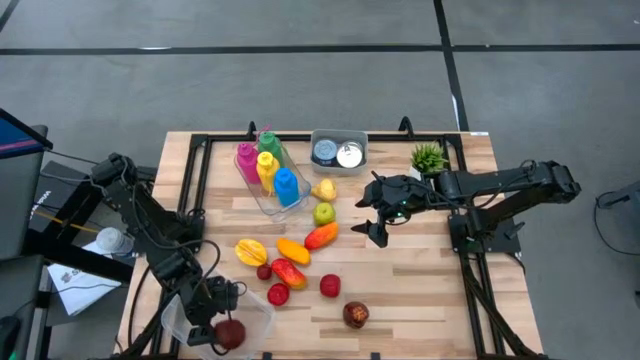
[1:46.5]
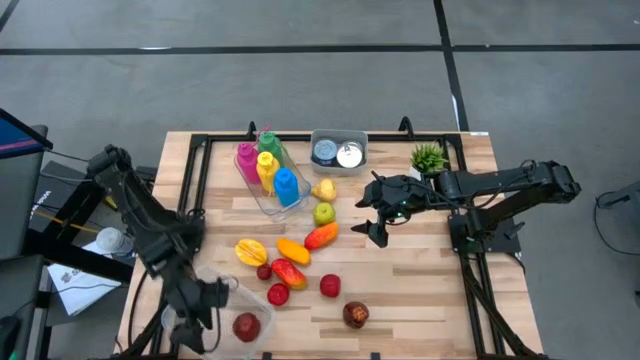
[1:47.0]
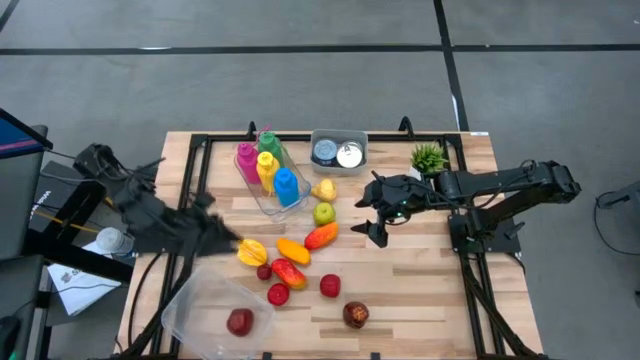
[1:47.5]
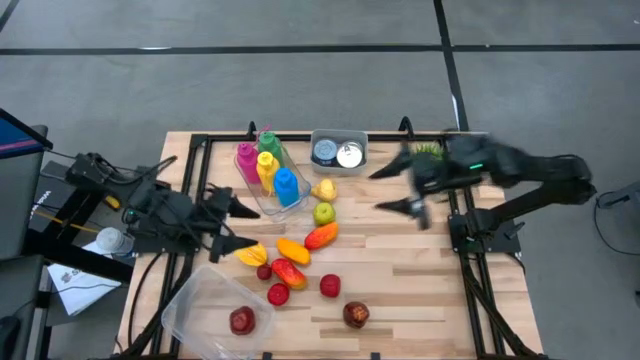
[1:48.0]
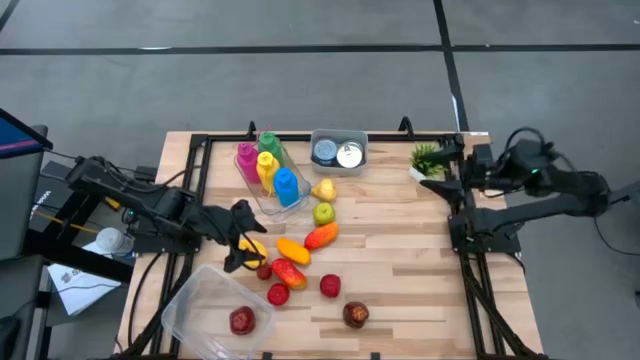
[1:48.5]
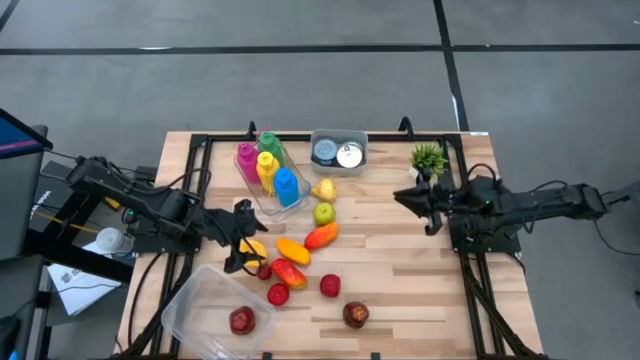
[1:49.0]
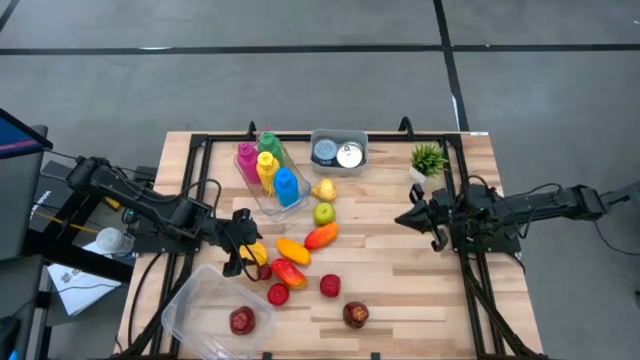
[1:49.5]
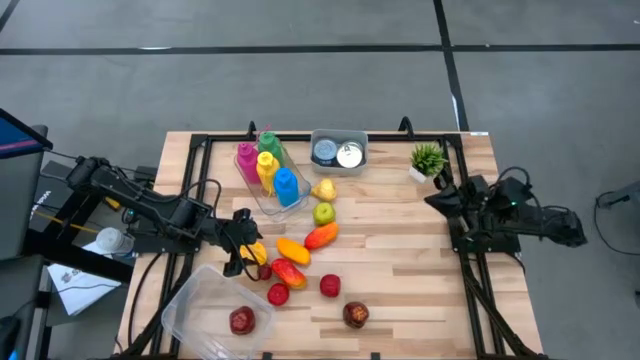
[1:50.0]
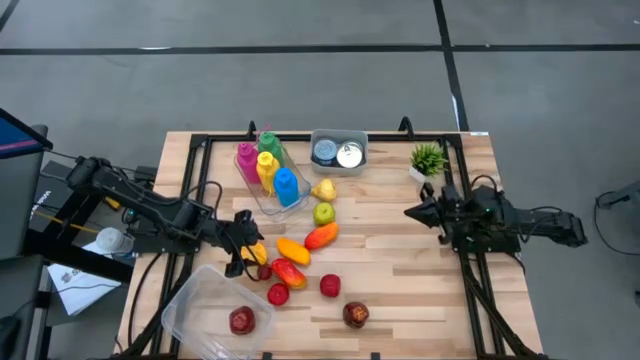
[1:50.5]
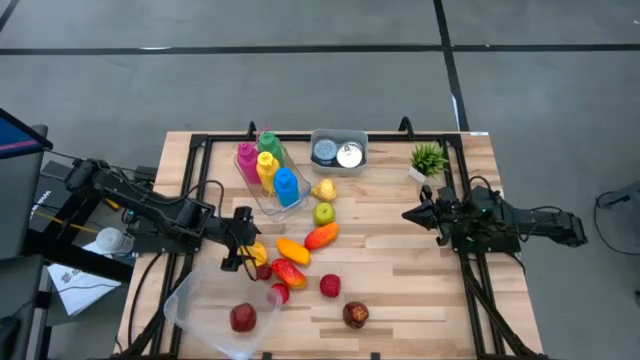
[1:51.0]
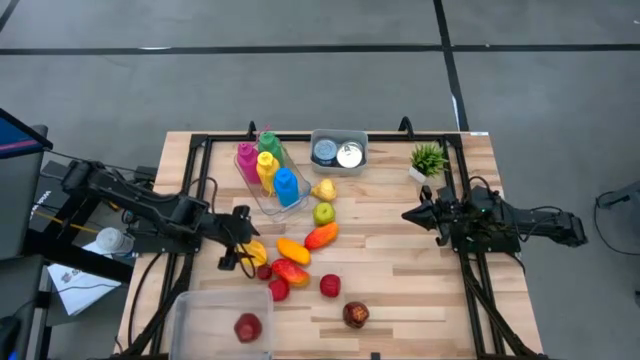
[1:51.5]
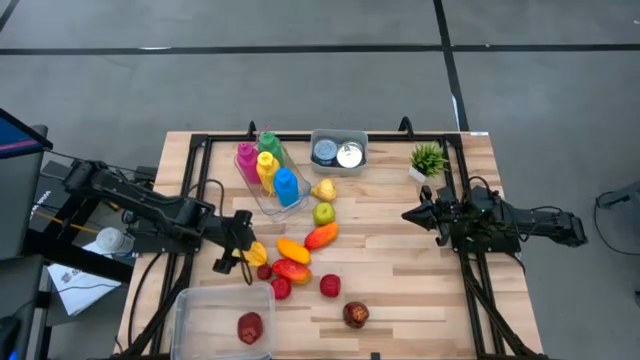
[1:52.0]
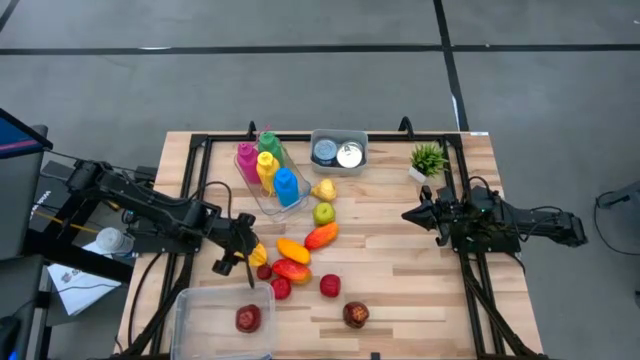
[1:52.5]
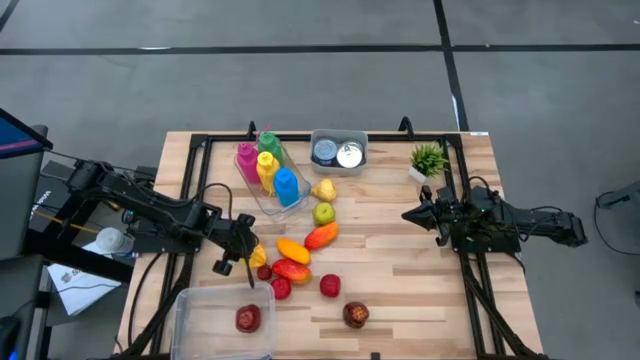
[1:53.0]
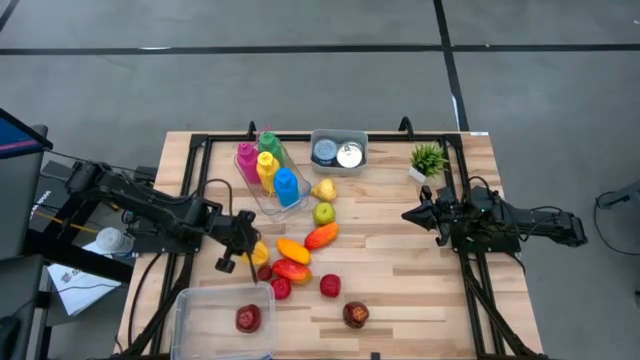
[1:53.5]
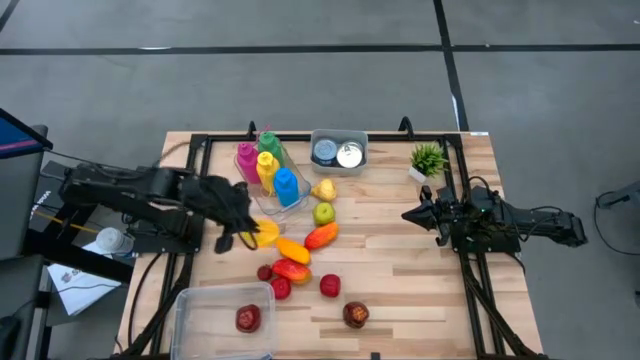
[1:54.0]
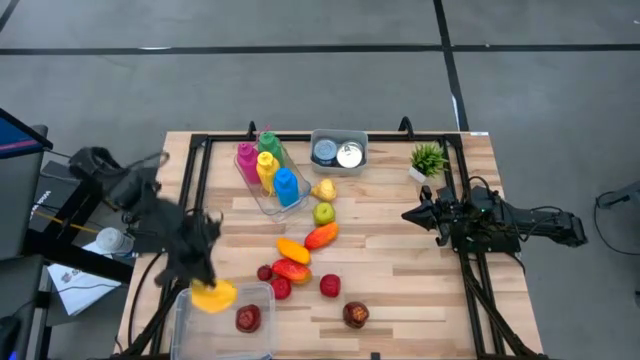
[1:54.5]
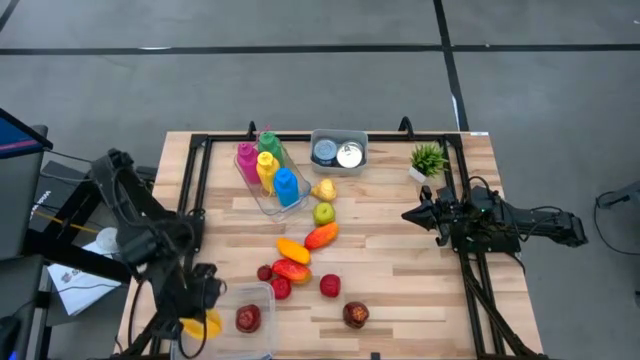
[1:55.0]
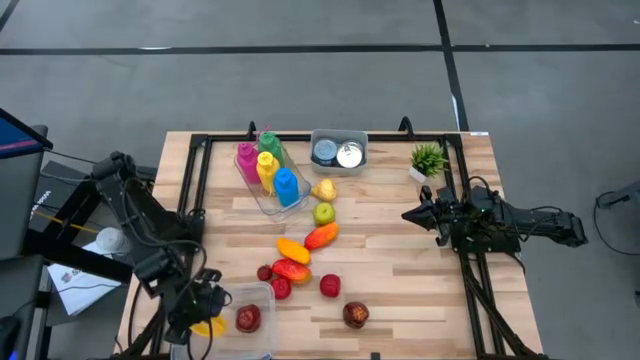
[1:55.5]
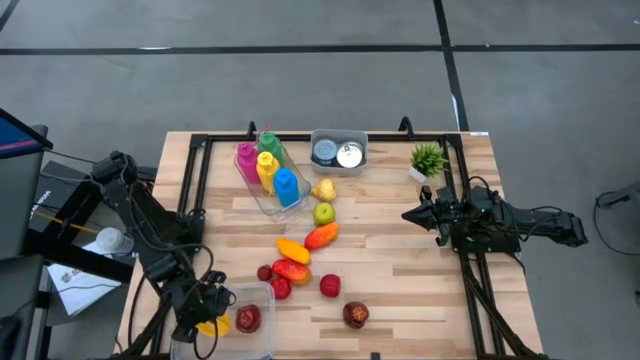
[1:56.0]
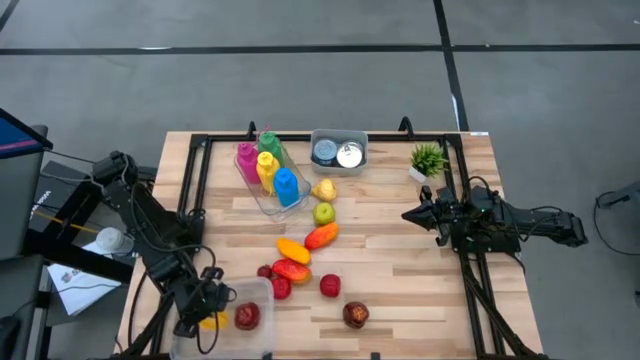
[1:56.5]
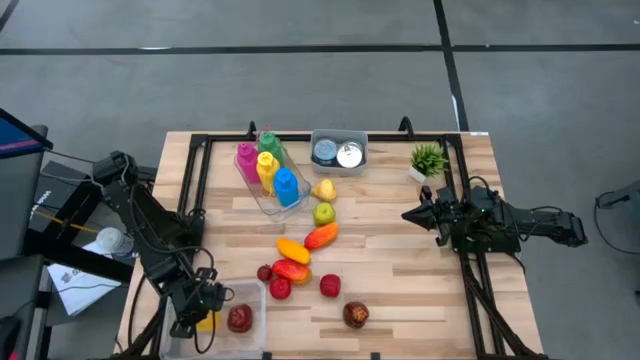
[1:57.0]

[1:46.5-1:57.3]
Task: Pick & Place Food Item
Put the yellow starfruit into the white bin

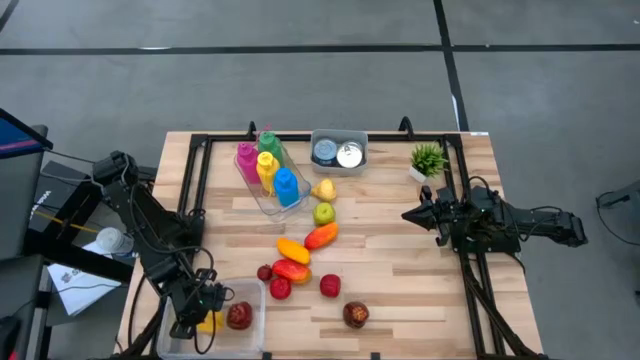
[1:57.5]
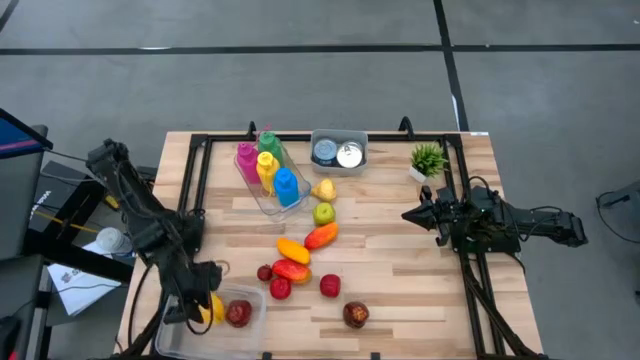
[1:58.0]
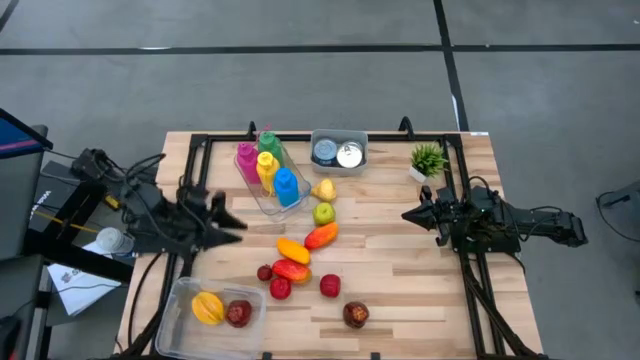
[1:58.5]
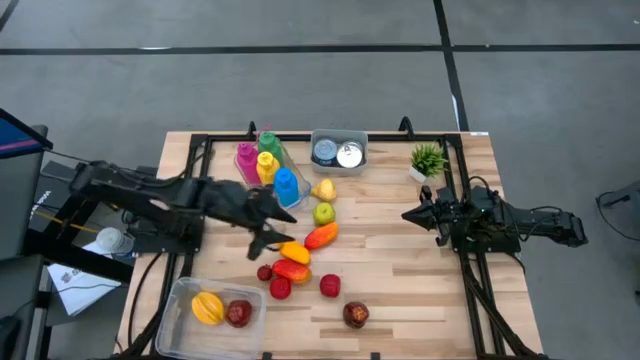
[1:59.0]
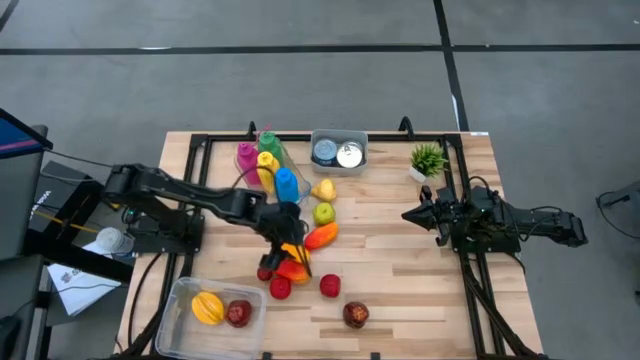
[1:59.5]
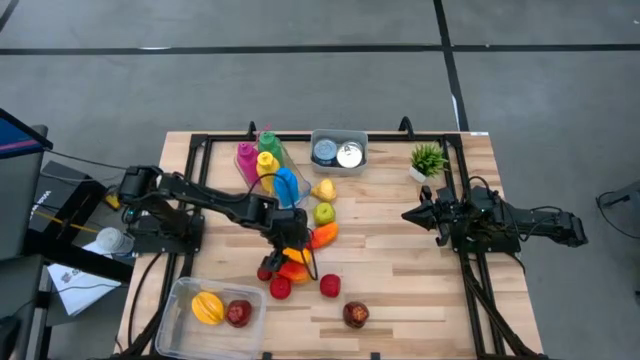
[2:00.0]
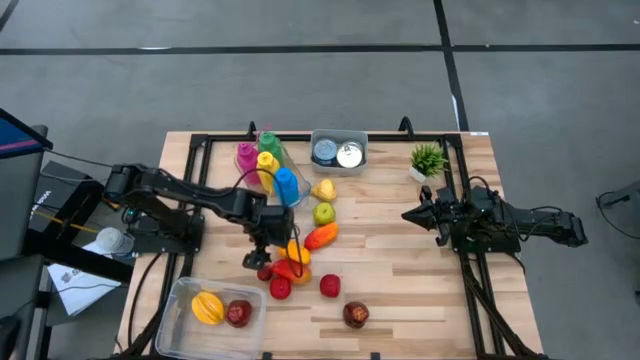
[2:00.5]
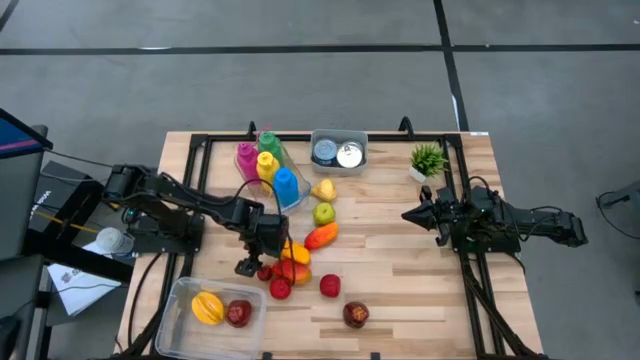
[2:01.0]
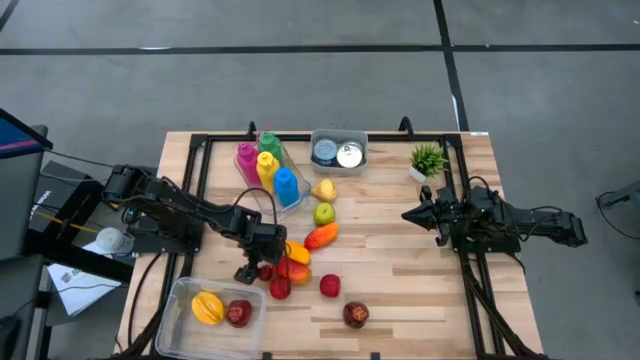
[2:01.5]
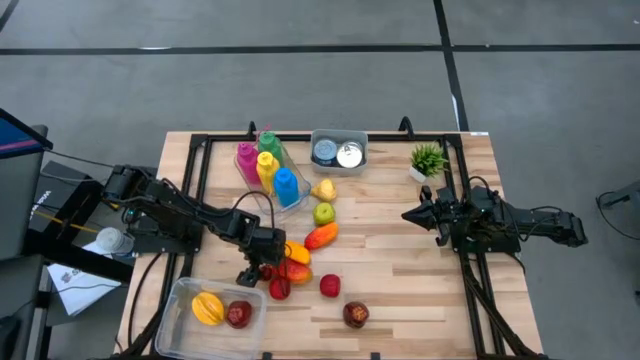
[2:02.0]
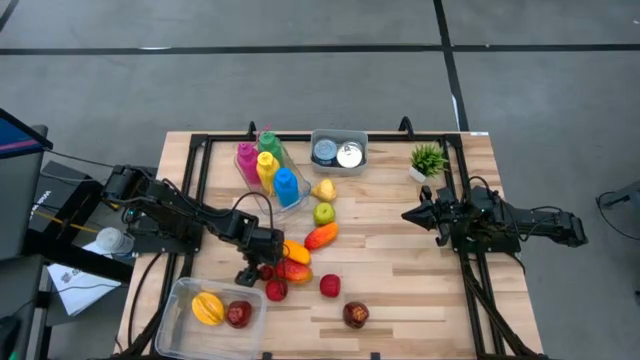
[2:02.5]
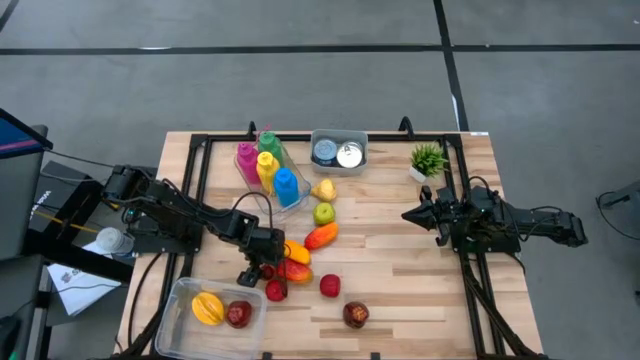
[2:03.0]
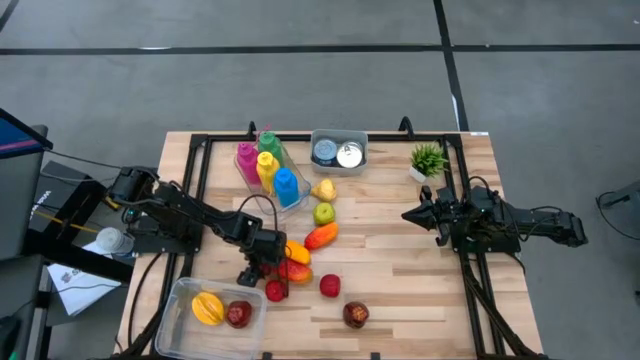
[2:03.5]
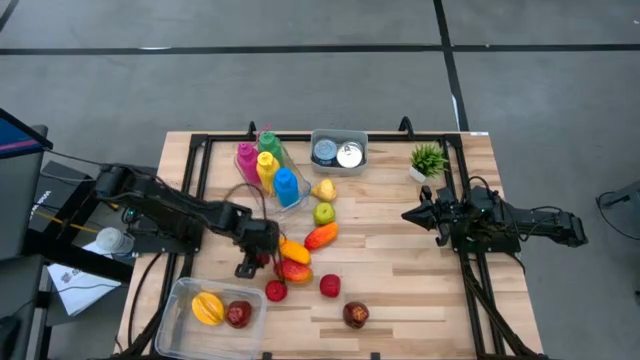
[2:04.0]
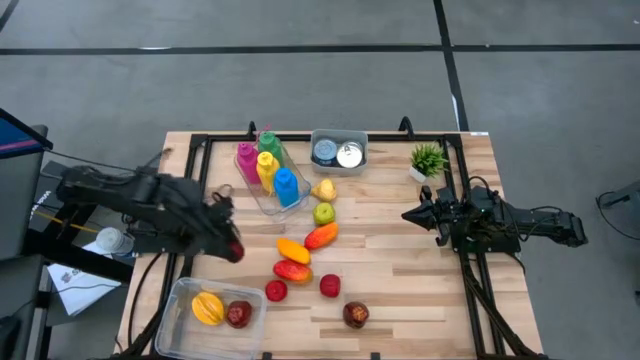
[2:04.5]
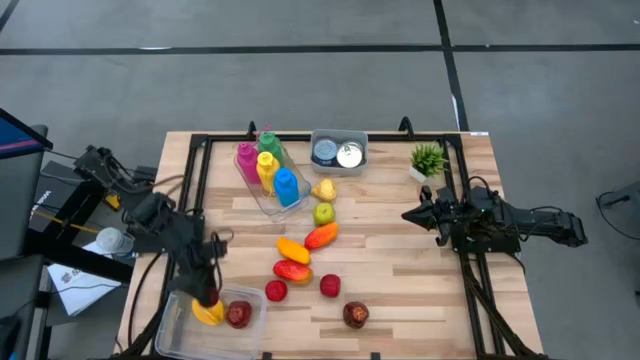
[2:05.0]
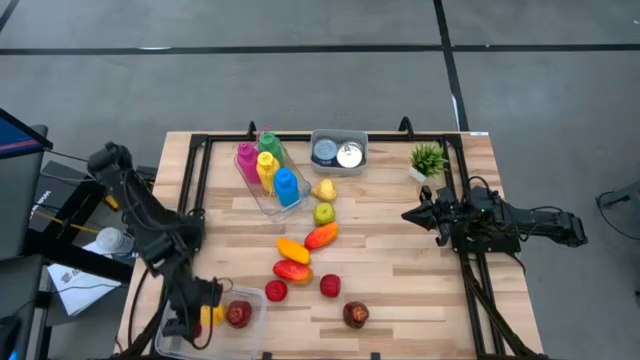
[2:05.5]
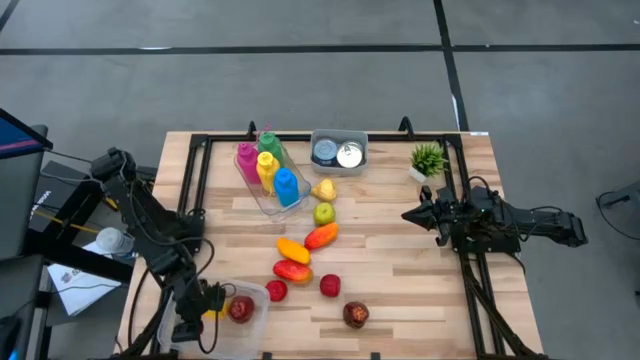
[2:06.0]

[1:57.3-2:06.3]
Put the red pomegranate into the white bin
